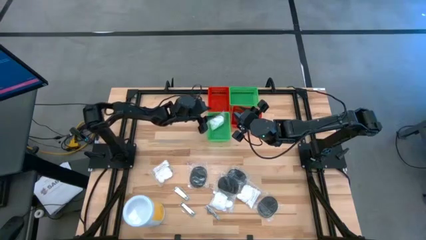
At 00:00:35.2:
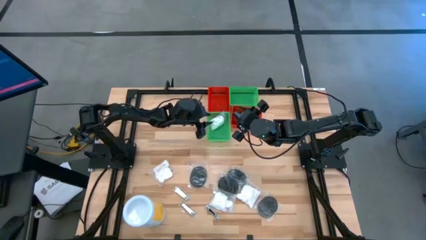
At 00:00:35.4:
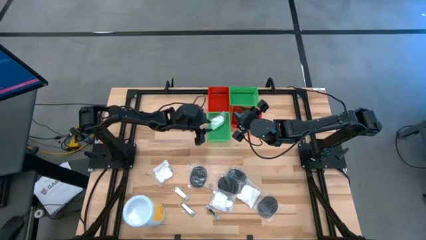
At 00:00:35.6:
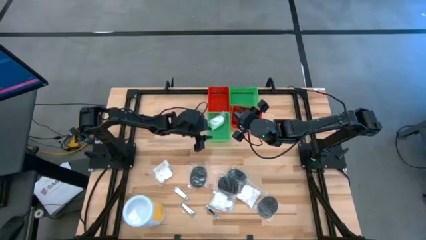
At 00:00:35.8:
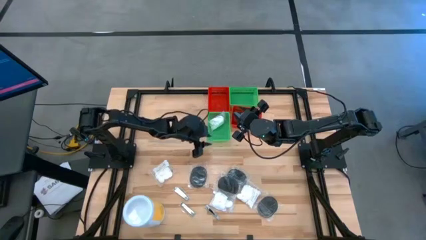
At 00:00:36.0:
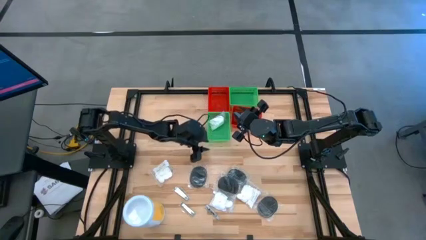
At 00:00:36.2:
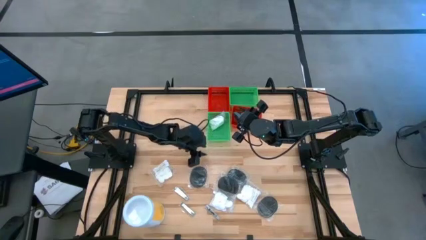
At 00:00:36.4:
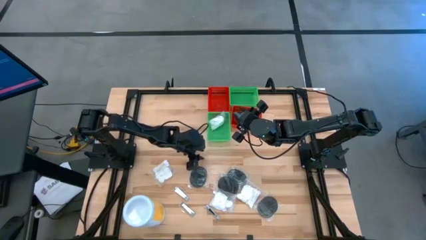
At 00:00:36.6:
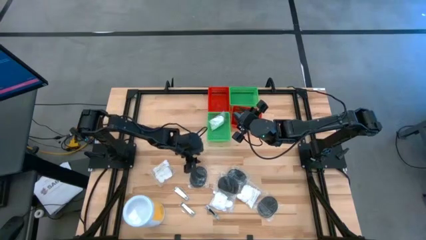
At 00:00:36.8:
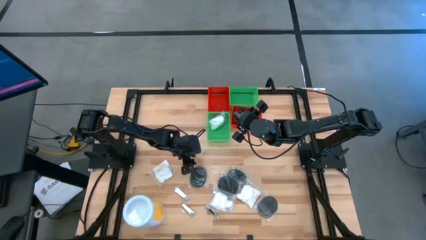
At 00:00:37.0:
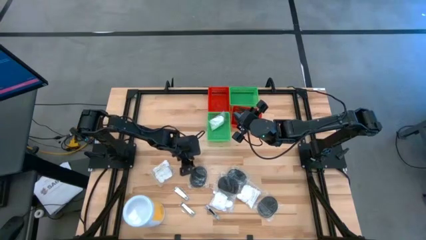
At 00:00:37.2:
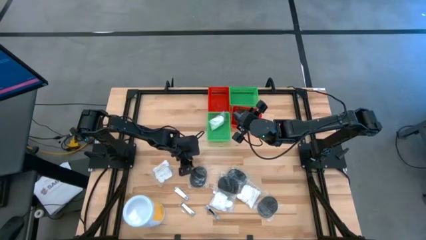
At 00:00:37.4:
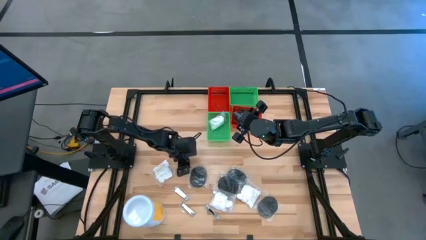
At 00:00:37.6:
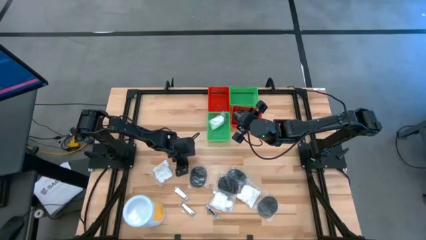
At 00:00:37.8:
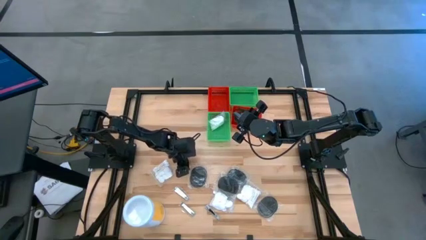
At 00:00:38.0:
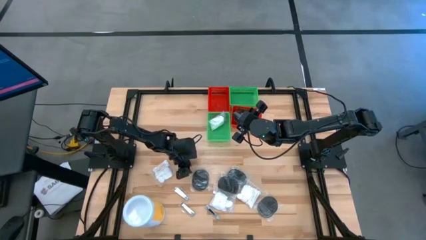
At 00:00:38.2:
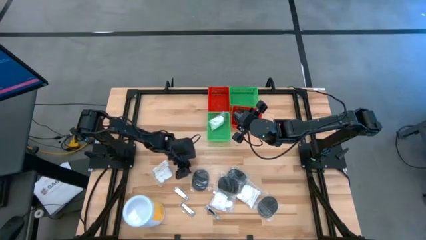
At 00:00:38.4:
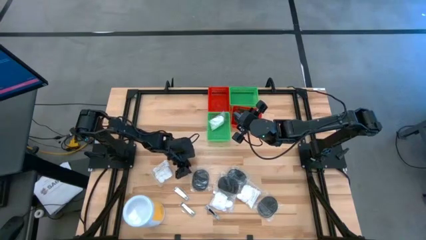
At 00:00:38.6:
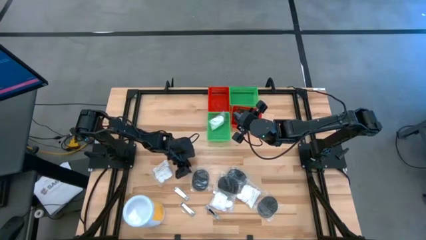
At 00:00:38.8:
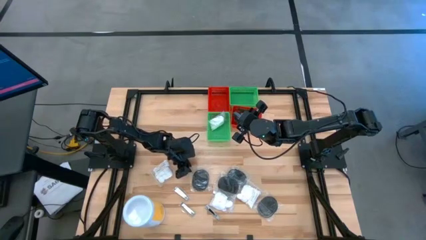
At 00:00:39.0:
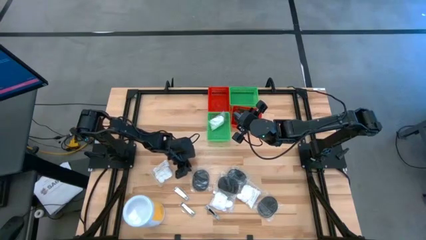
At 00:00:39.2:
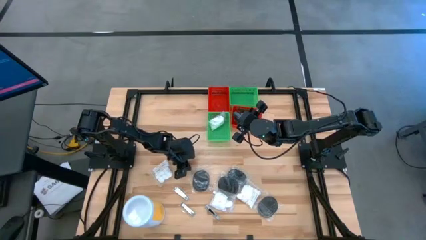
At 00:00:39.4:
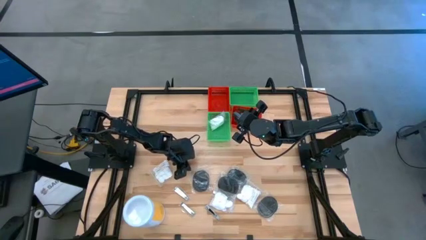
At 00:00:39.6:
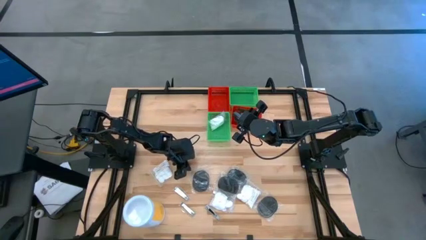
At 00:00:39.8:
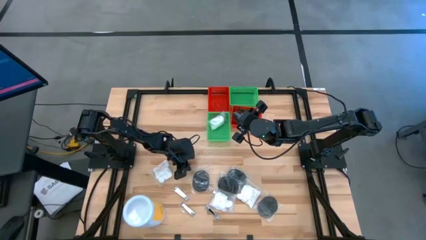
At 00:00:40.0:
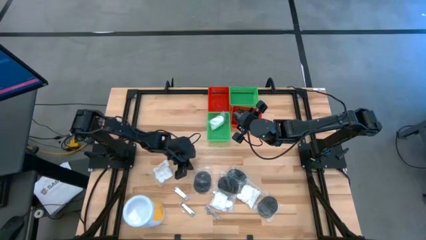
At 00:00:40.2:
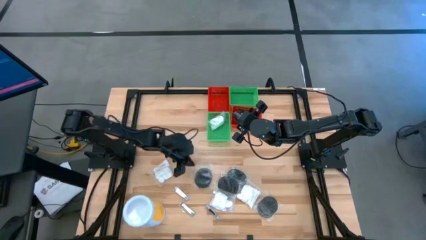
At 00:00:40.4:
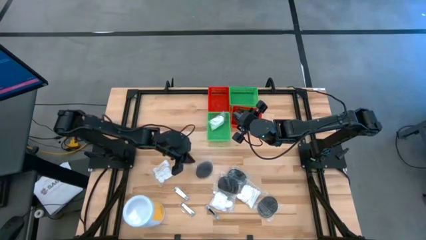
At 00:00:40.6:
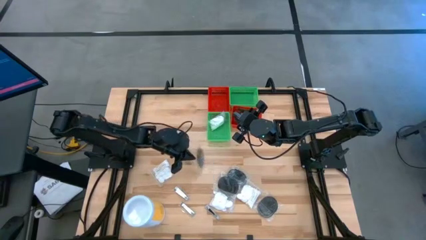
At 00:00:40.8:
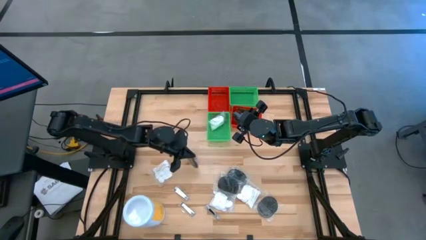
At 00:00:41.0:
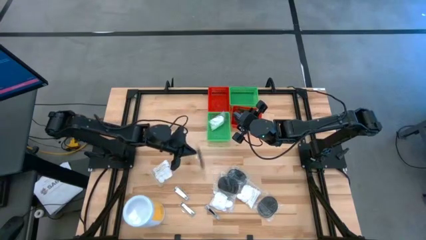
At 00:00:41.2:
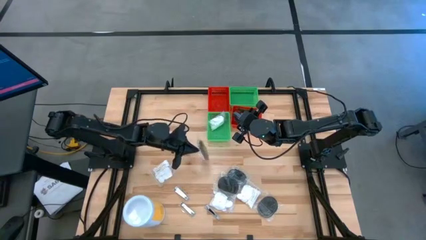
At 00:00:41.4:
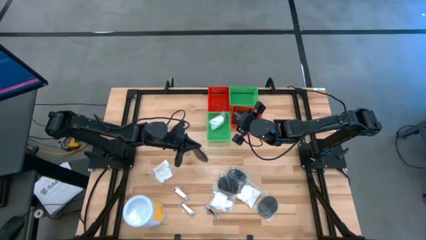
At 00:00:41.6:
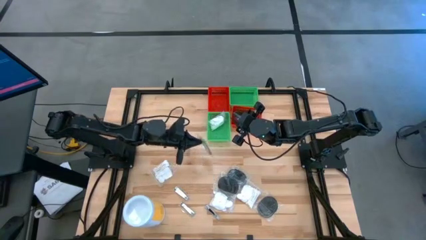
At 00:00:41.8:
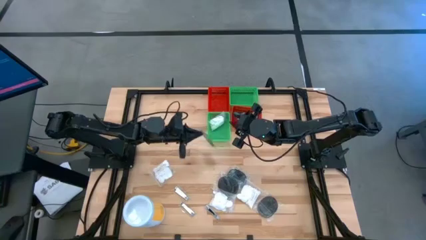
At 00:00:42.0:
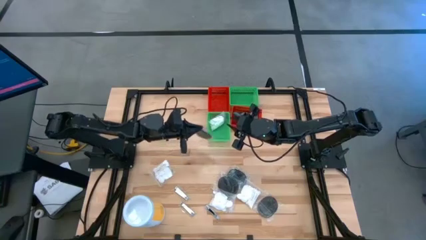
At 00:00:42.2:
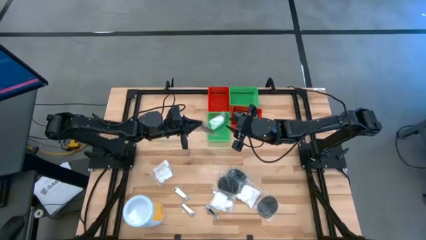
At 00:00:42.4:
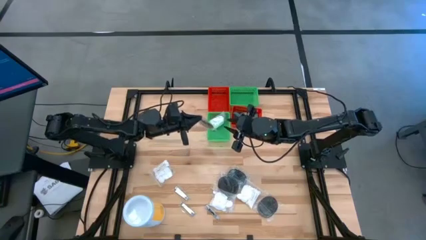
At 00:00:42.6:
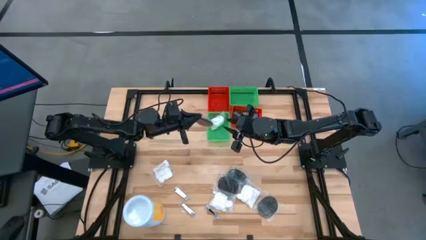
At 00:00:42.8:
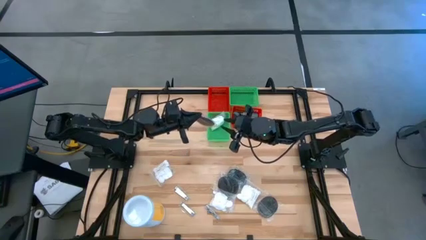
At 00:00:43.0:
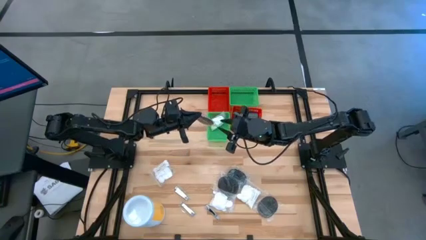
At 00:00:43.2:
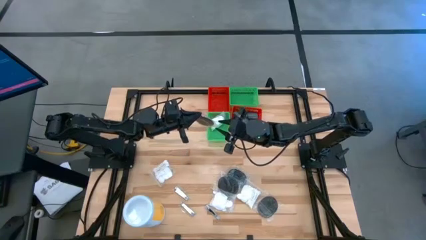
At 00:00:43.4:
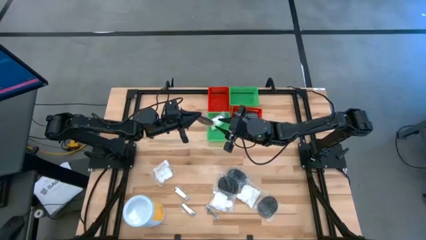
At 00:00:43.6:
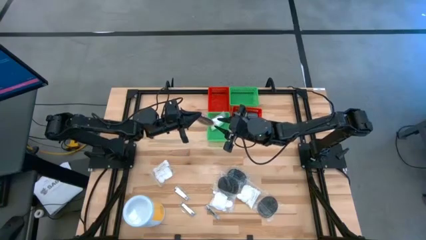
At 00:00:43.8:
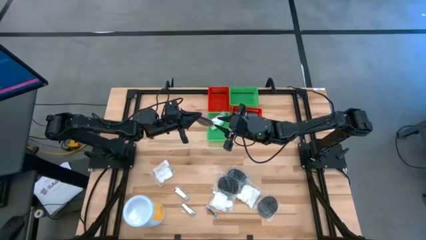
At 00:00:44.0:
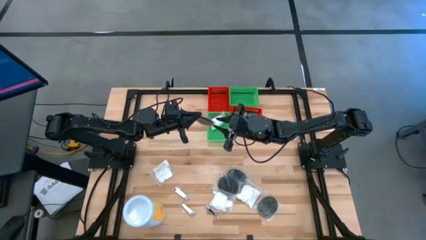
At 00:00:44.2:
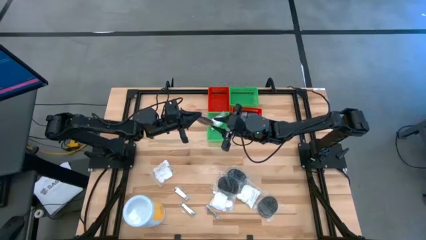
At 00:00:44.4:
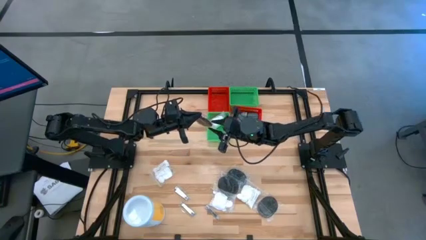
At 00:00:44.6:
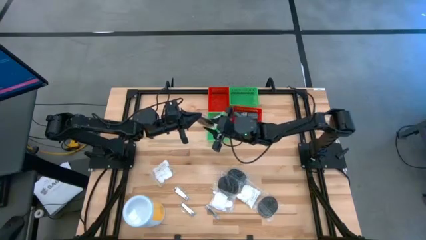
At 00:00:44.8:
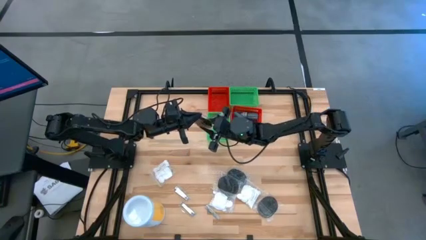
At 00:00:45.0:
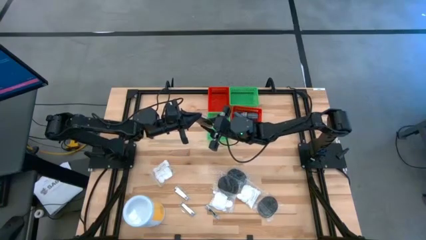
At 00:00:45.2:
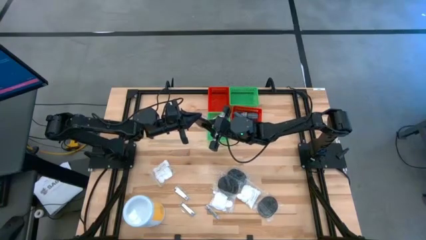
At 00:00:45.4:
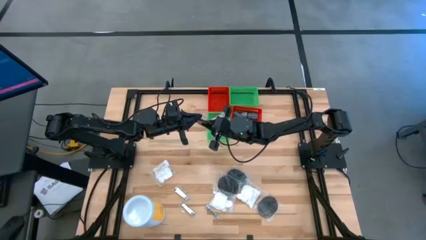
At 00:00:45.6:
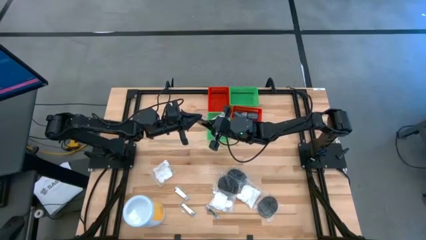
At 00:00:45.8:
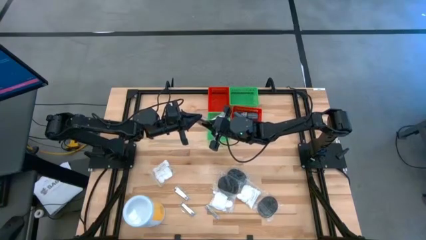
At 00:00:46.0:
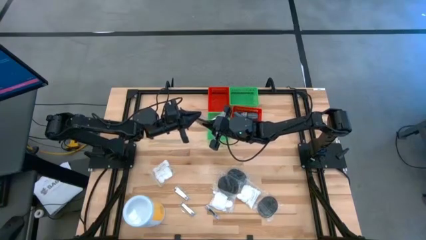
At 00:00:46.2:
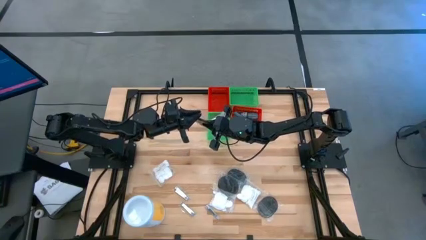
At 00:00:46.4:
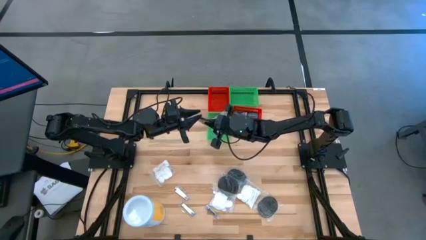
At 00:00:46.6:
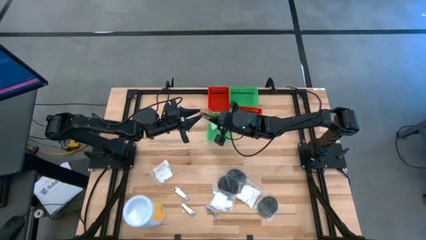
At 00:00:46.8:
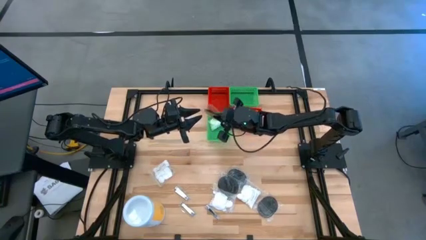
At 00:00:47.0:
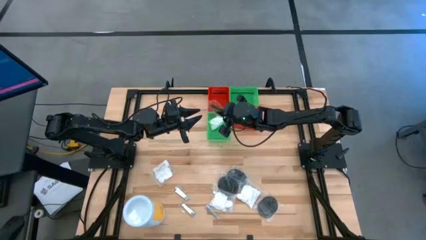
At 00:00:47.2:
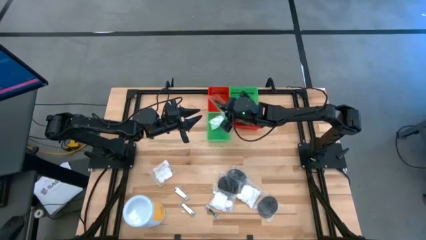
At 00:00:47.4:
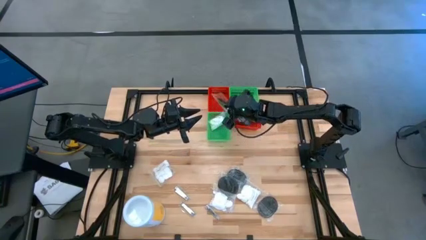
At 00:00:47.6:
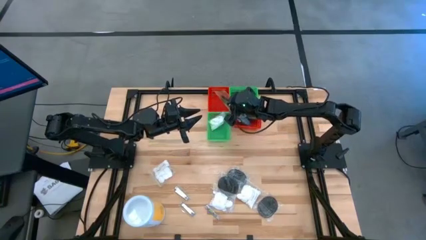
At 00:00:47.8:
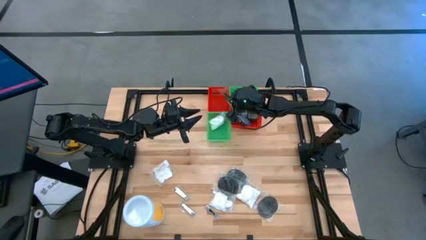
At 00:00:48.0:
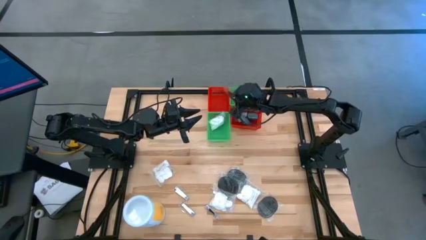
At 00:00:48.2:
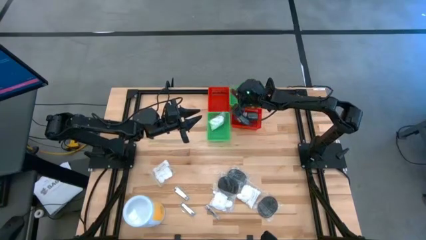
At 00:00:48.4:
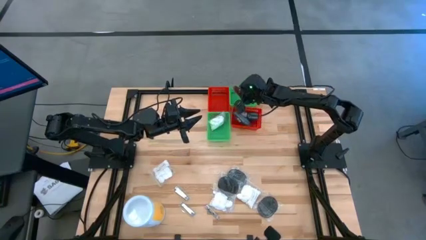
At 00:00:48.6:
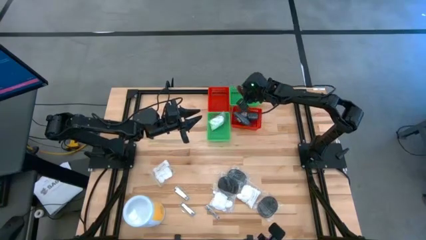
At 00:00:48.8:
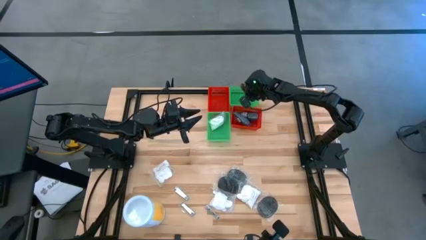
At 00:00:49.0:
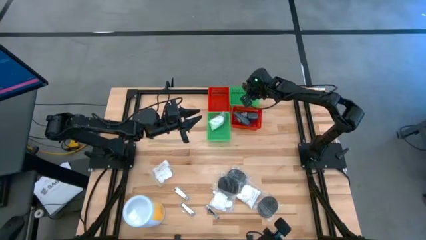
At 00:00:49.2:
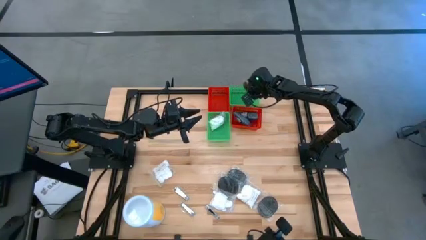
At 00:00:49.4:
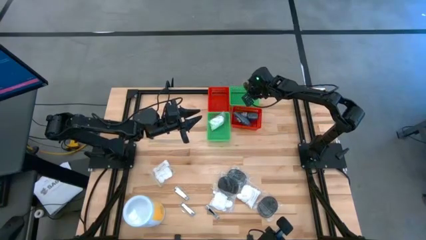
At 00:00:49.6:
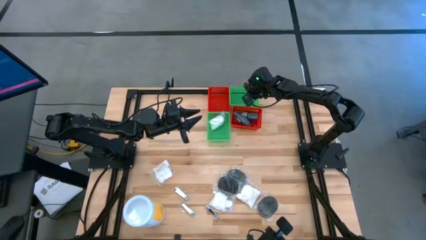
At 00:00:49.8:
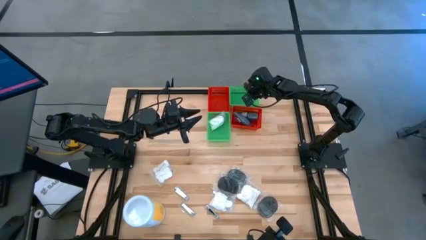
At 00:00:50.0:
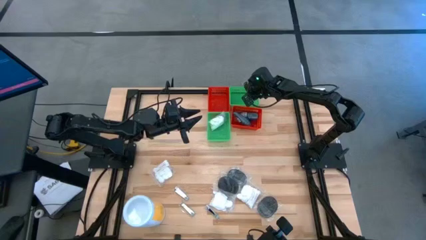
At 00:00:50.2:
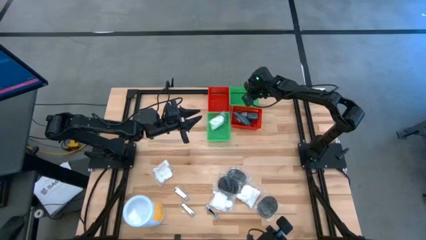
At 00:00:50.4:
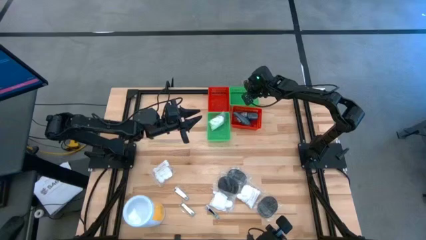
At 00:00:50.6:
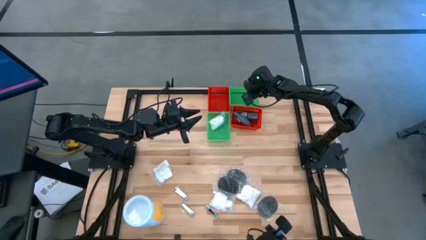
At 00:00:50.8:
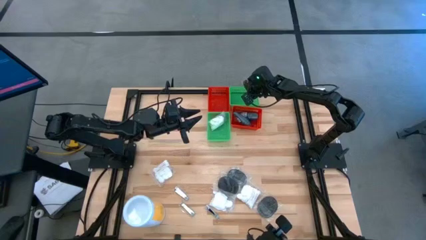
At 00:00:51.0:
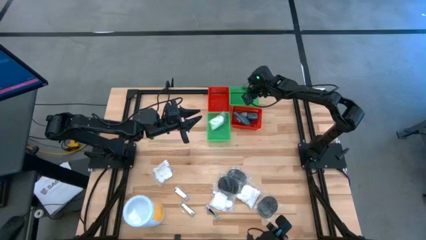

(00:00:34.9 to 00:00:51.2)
Task: Pick & Place Travel size toiletries
Put the hairbrush into the right green bin
